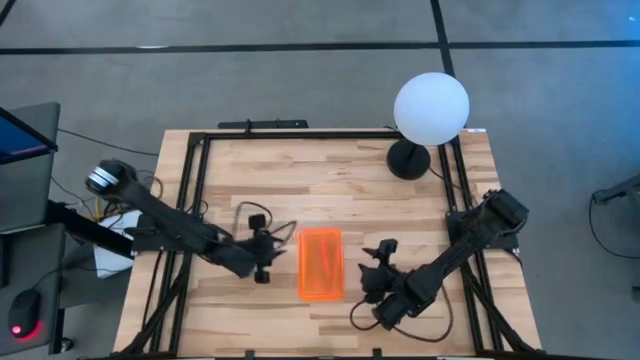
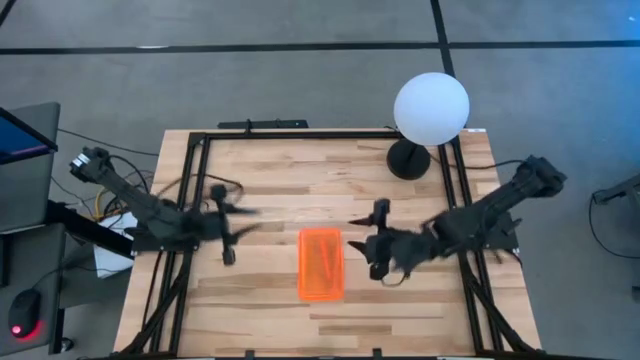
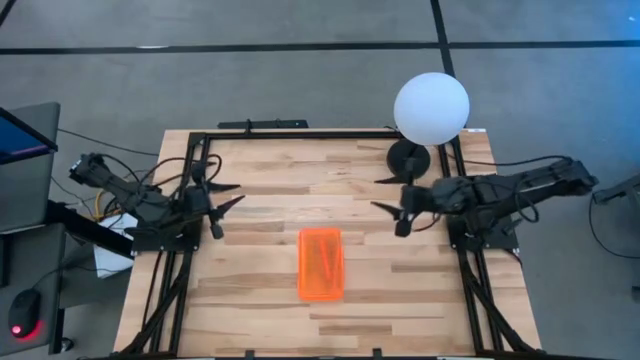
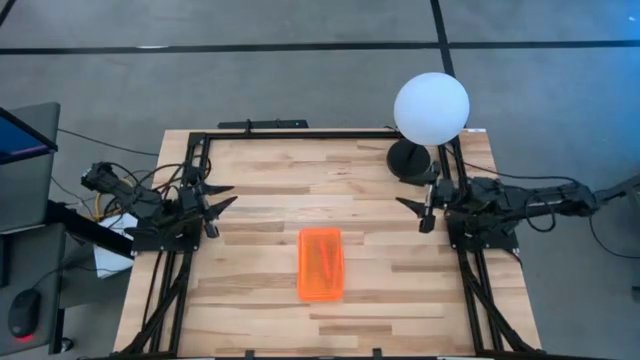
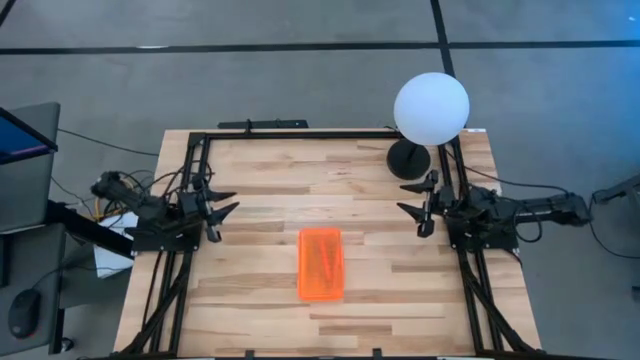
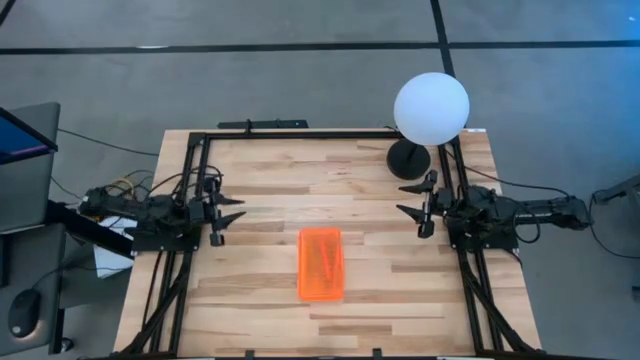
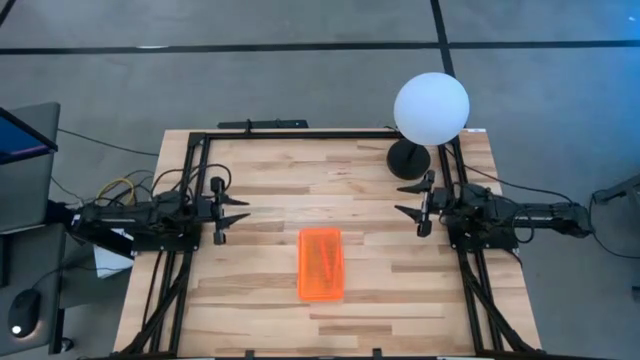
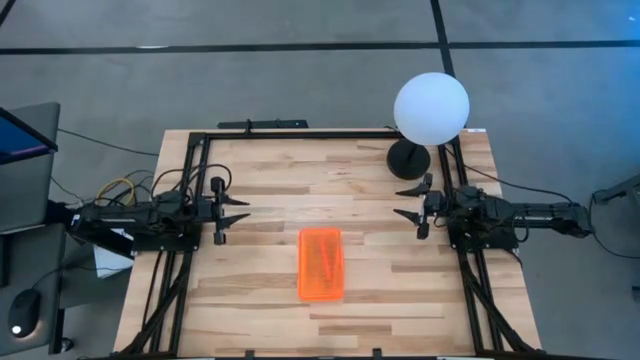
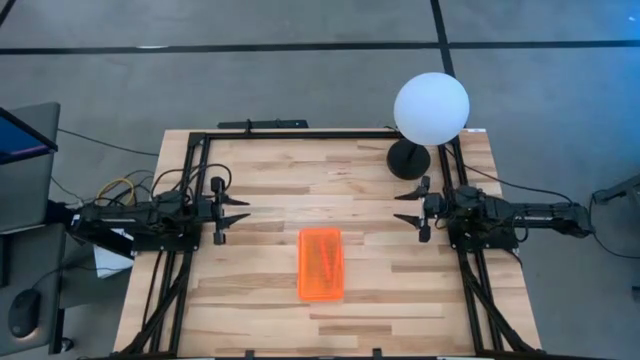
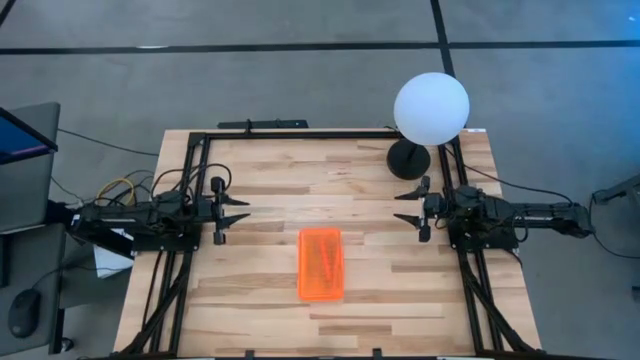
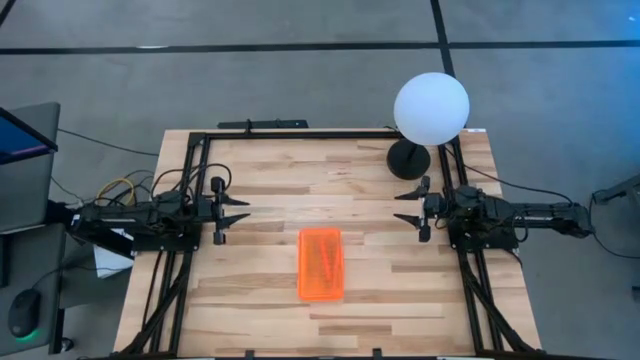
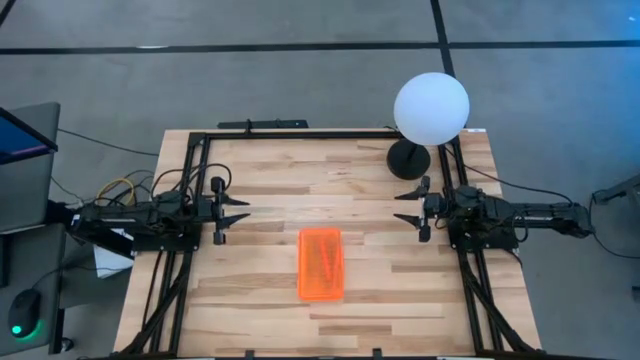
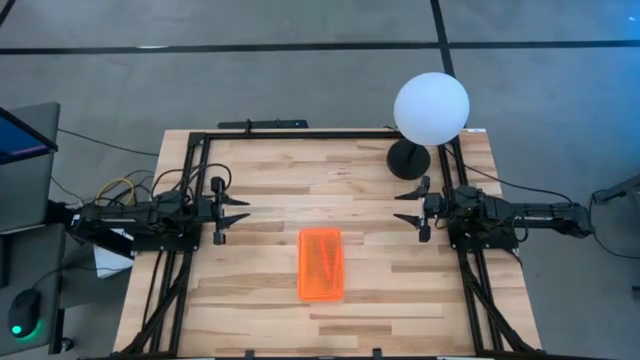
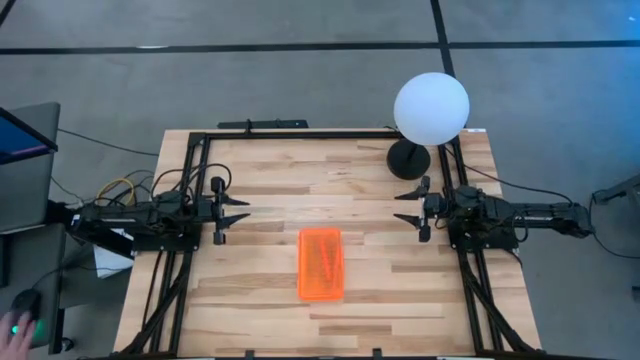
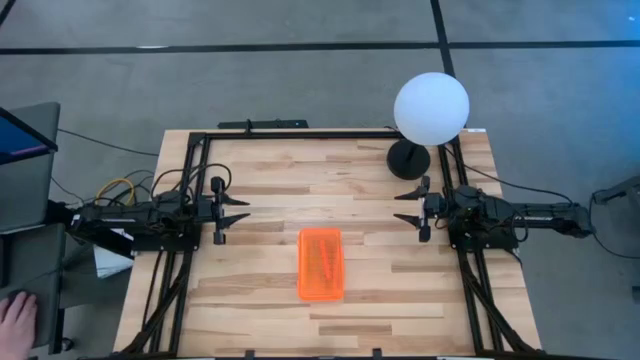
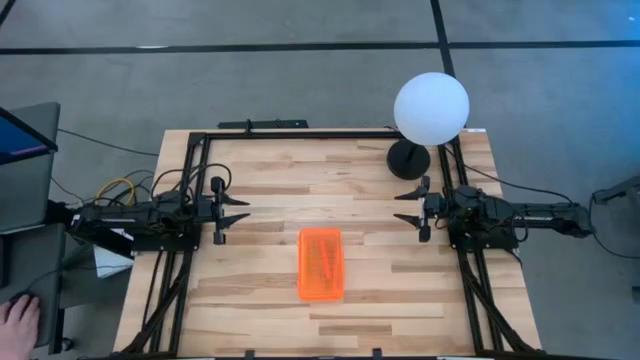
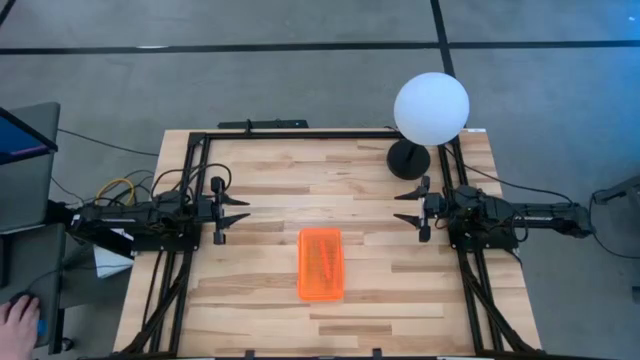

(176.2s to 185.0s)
Task: Pick & place school supplies into a supply box
Return to Home Position

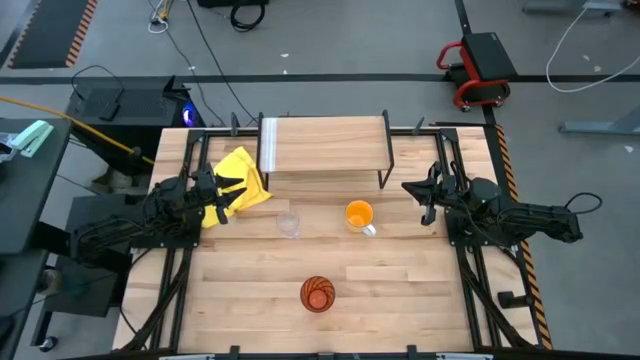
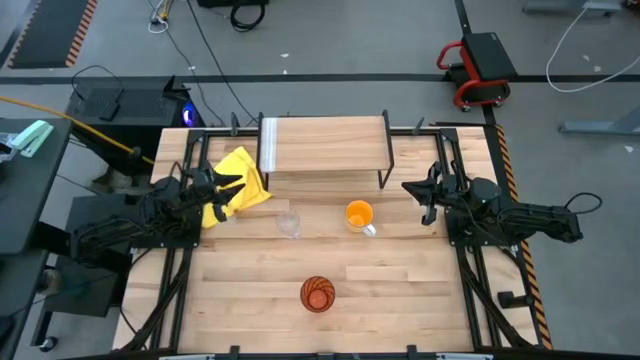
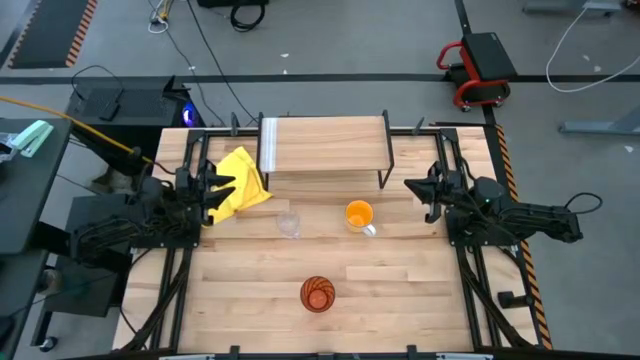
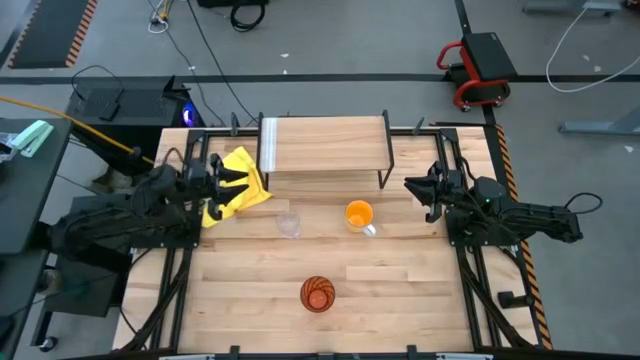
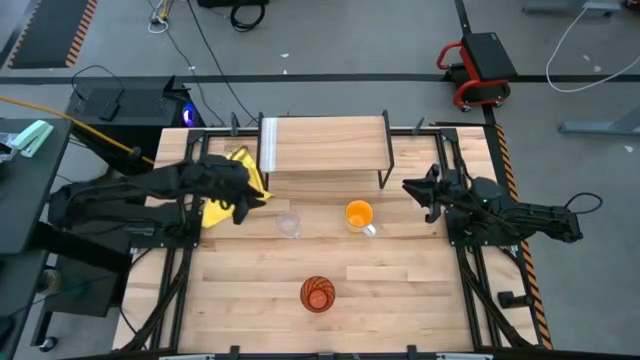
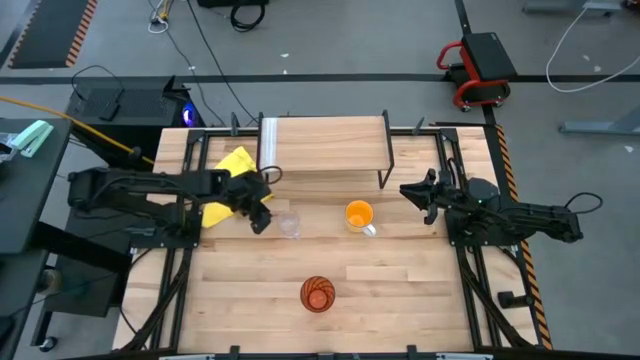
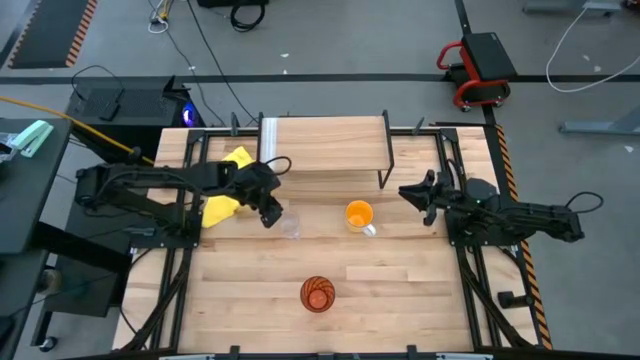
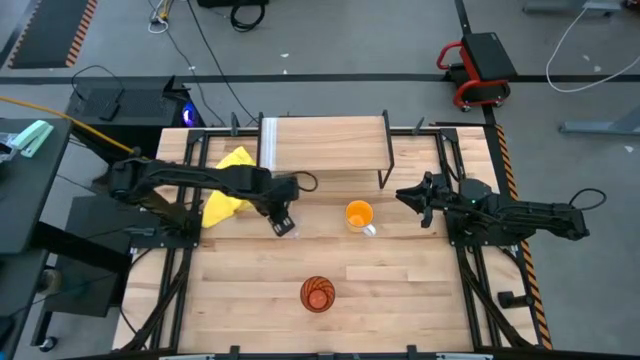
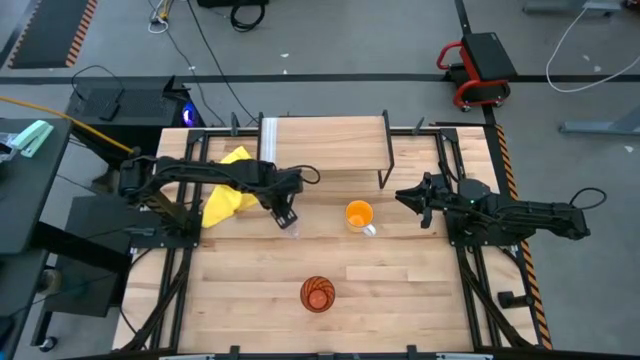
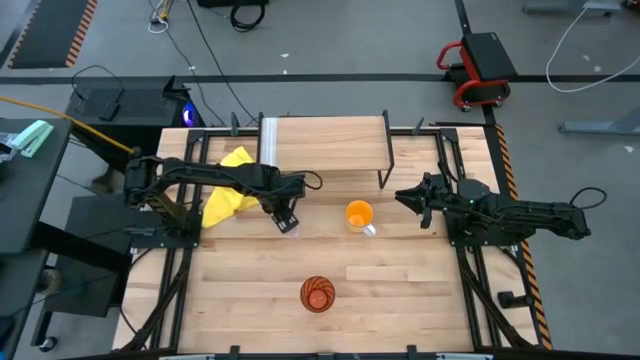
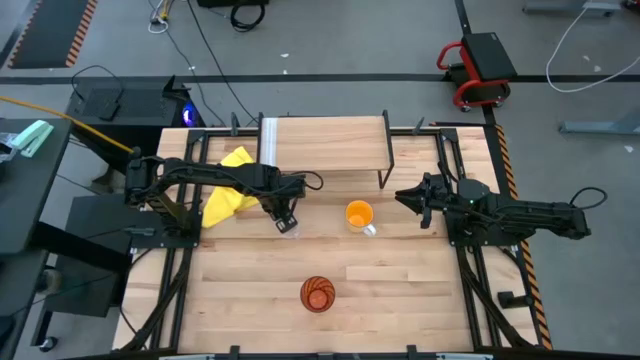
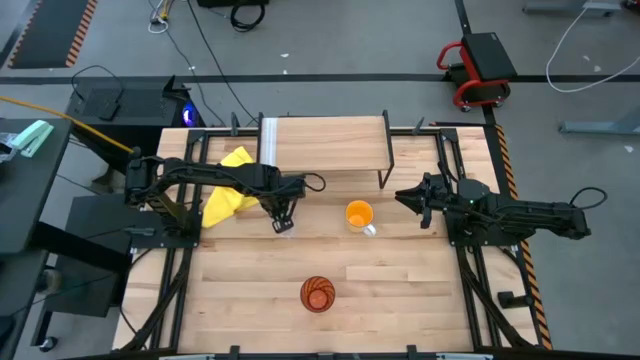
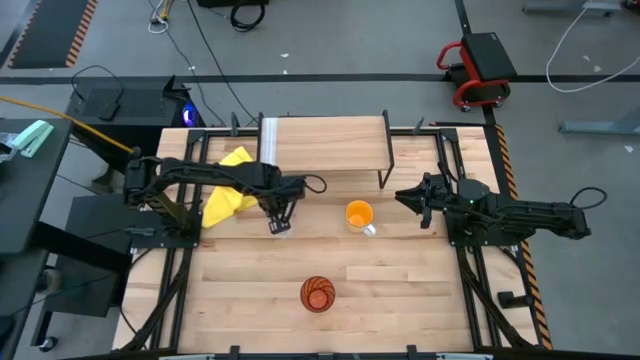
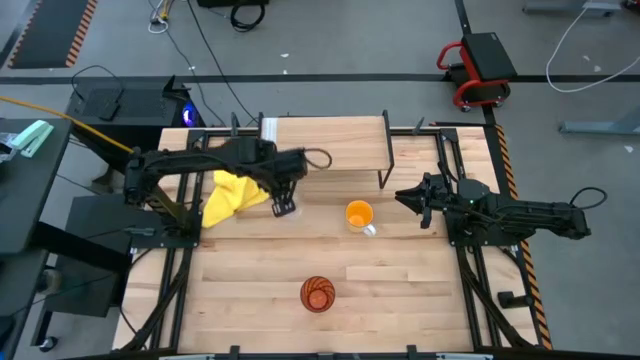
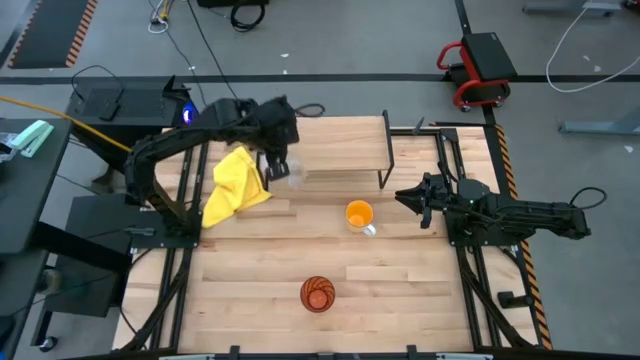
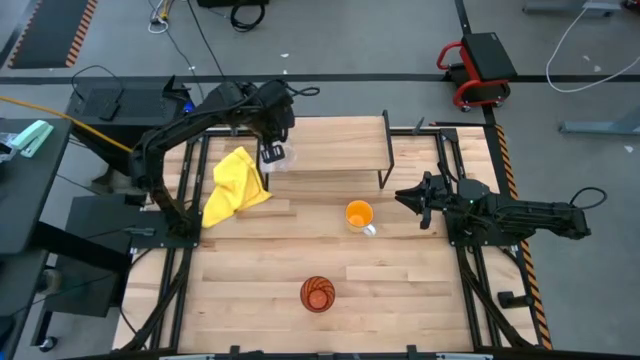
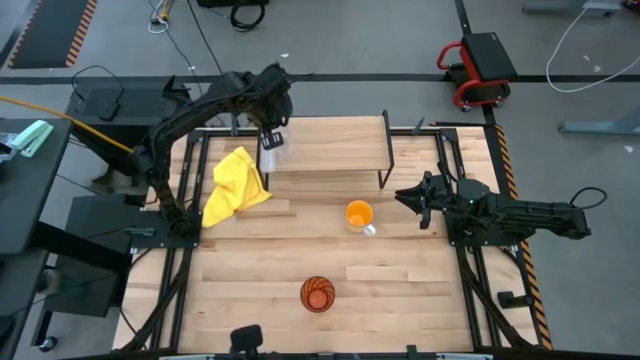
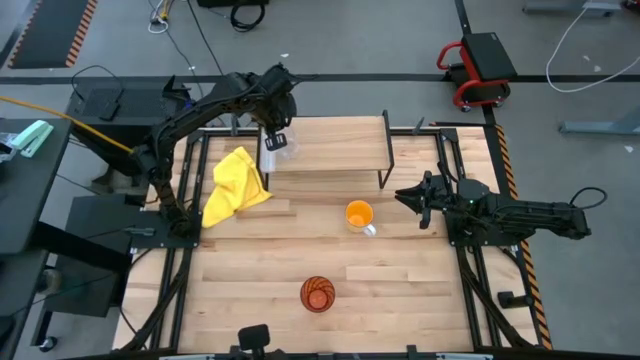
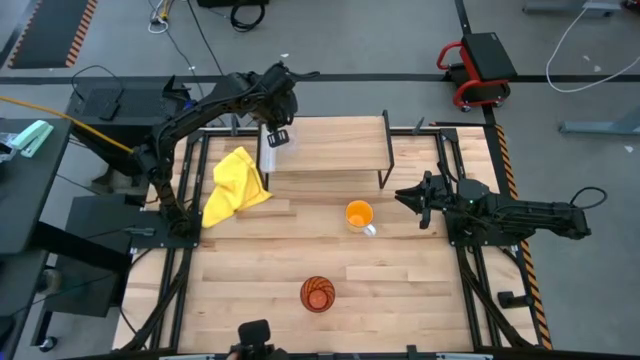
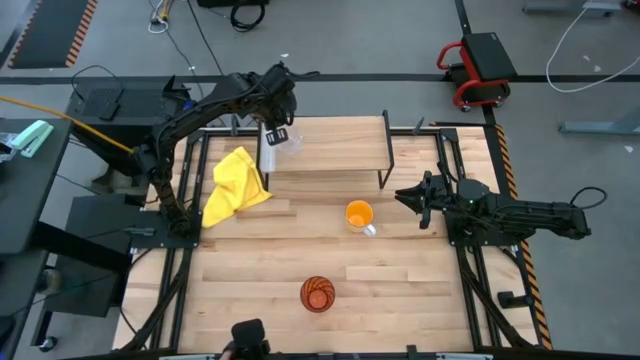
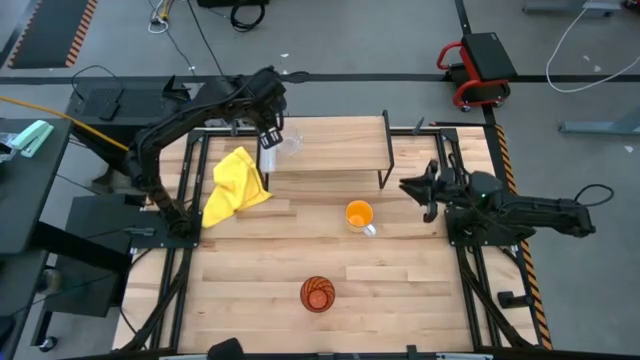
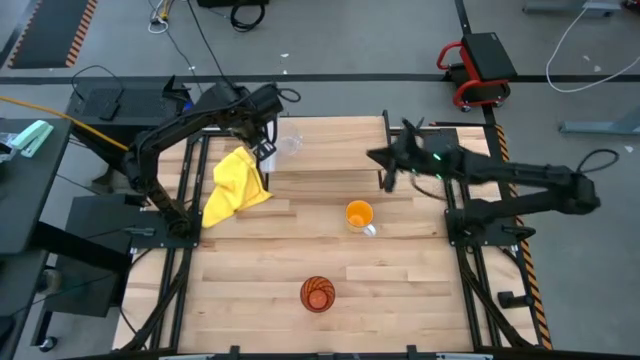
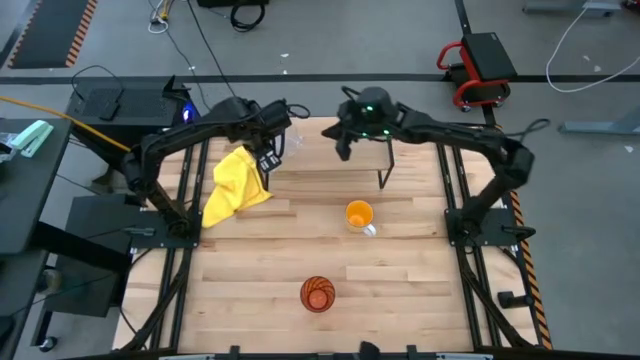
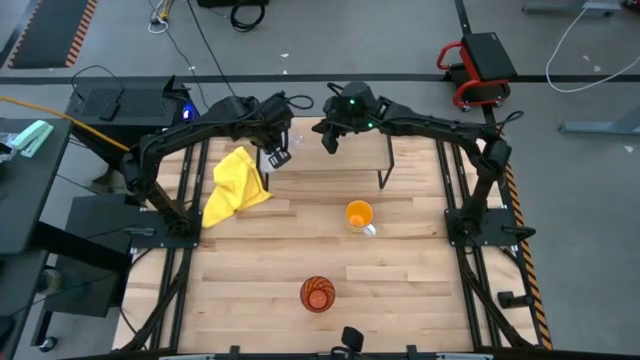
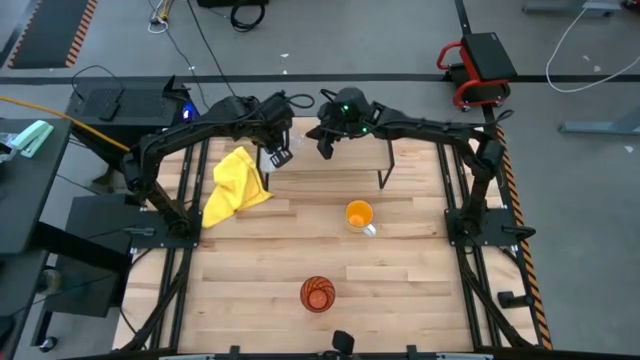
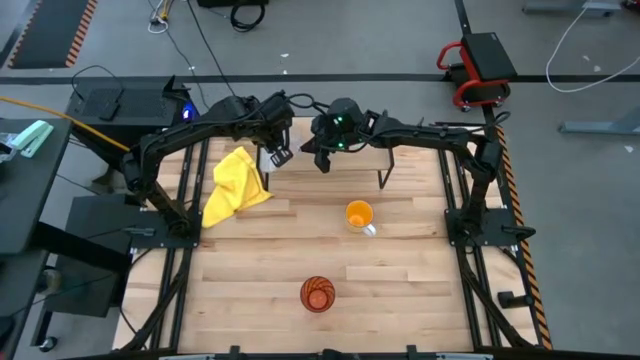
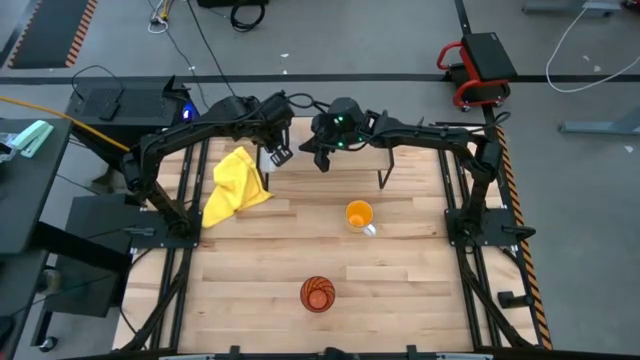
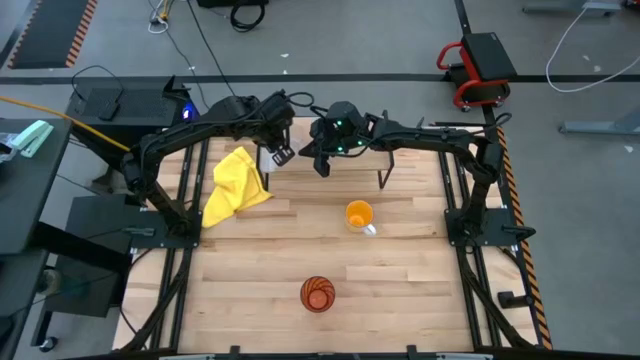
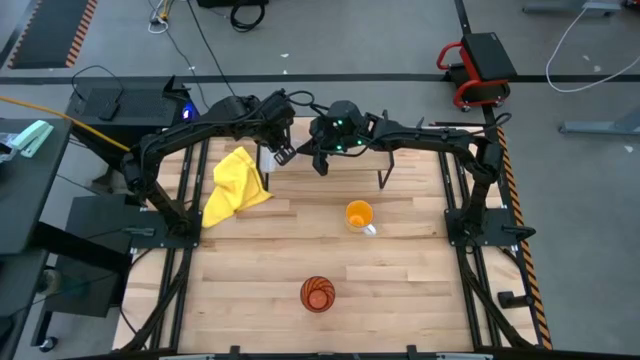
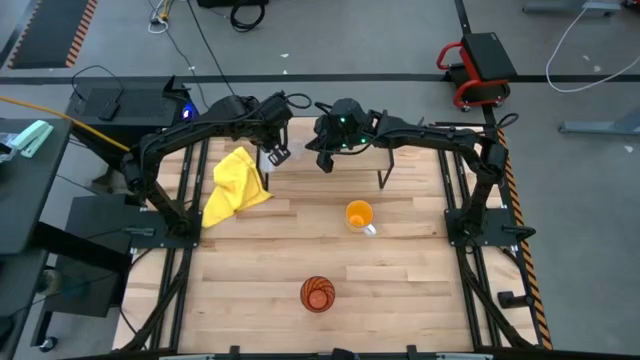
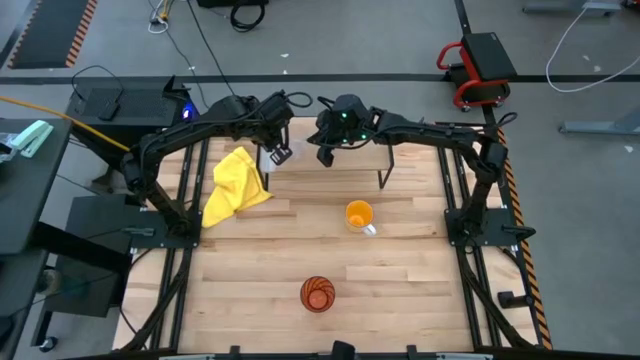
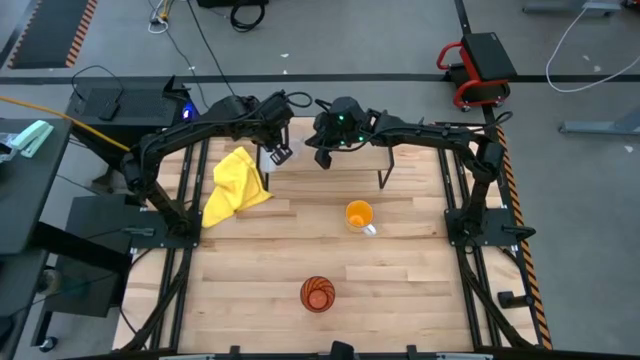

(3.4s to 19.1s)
Task: Stack small to large cups/mugs on shelf
Put the transparent mug on the shelf
